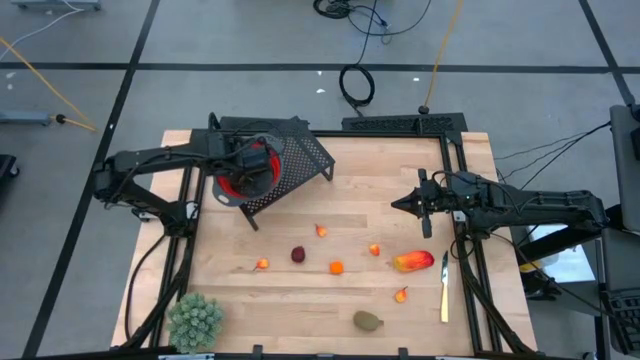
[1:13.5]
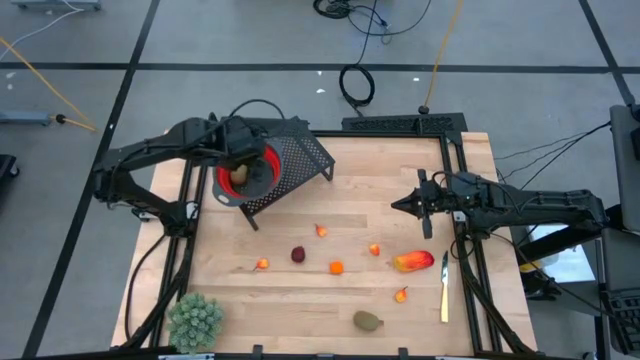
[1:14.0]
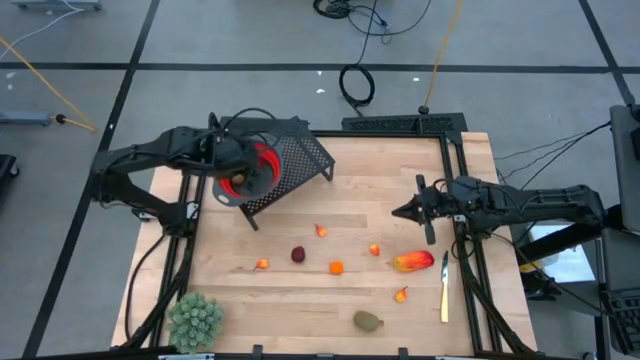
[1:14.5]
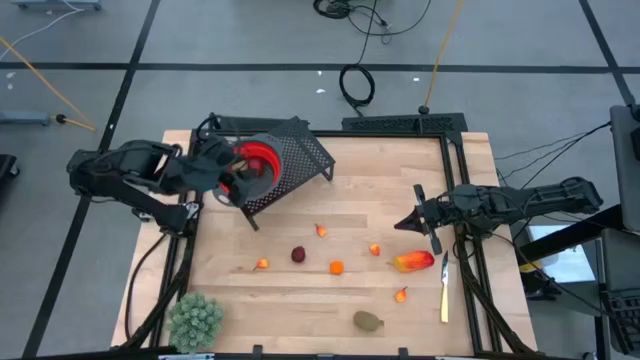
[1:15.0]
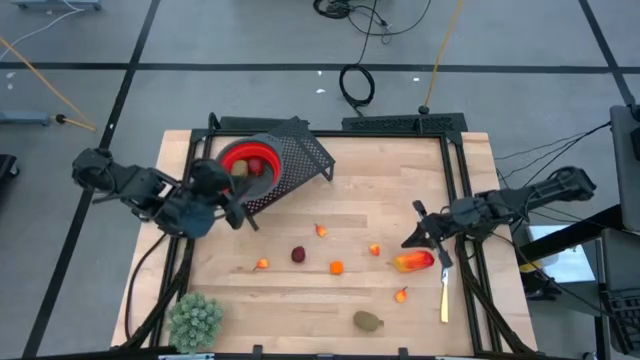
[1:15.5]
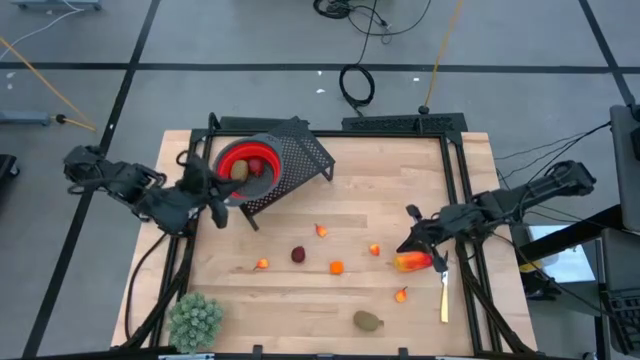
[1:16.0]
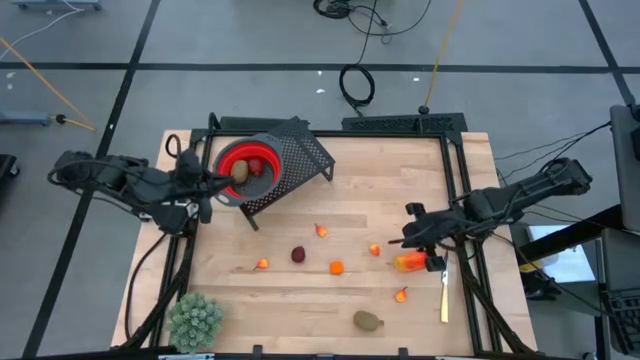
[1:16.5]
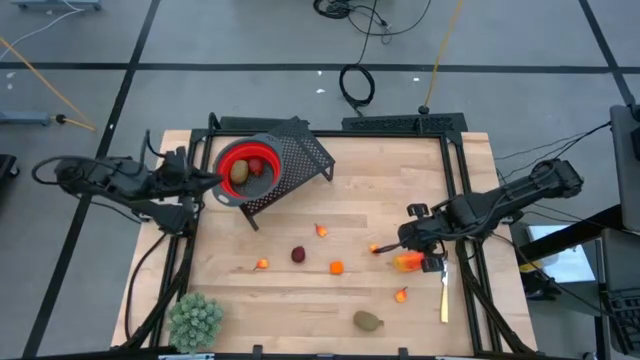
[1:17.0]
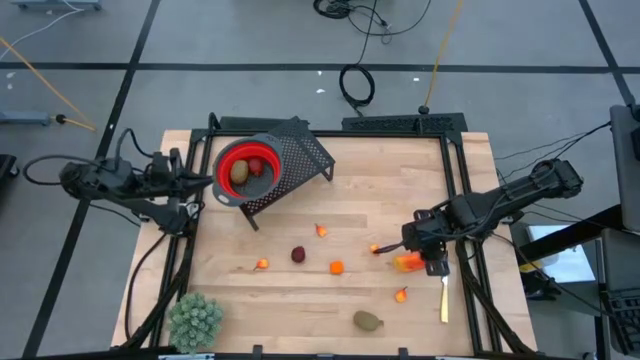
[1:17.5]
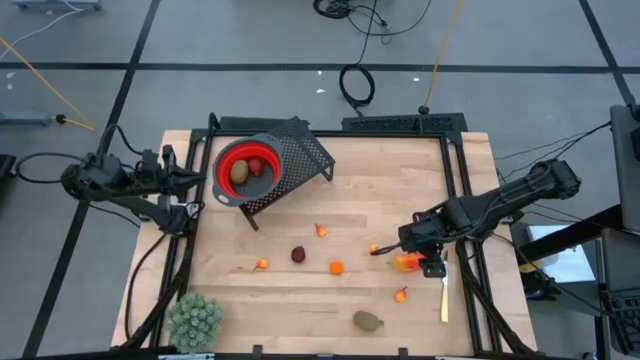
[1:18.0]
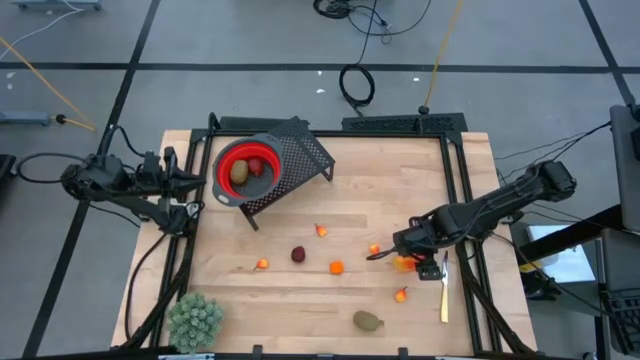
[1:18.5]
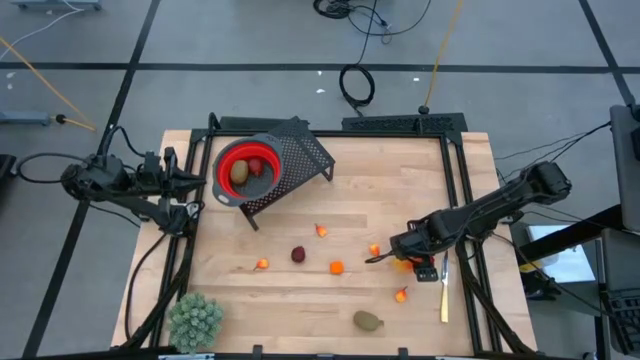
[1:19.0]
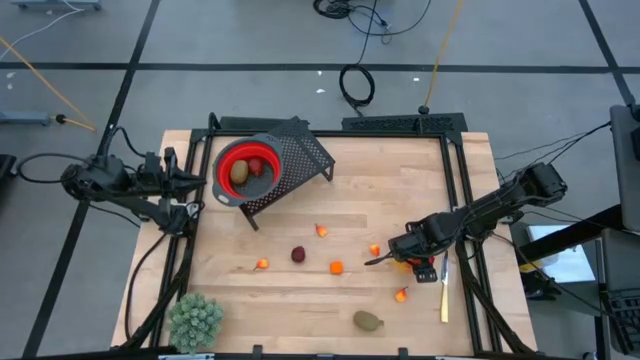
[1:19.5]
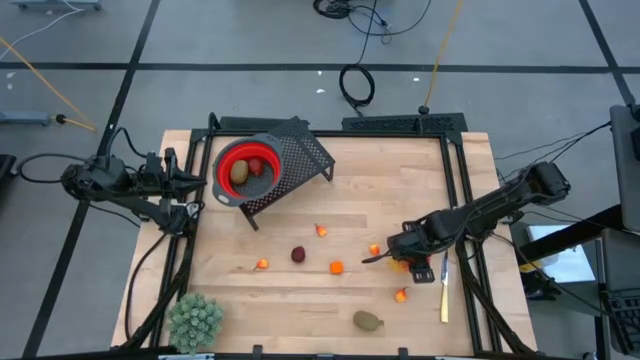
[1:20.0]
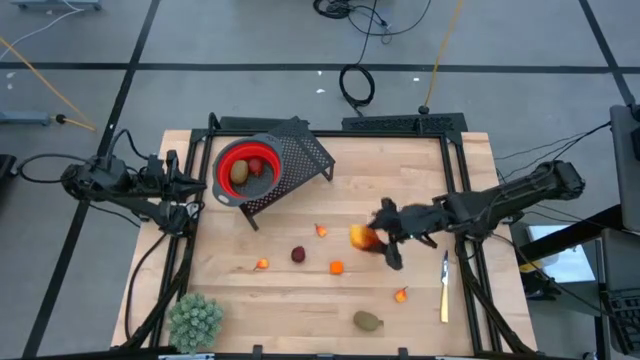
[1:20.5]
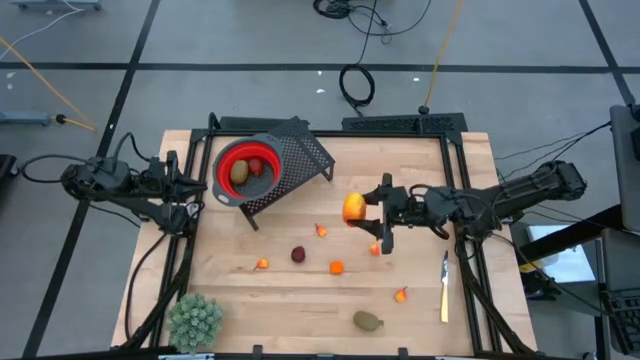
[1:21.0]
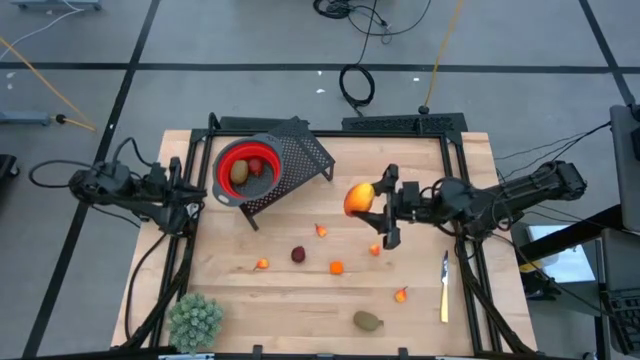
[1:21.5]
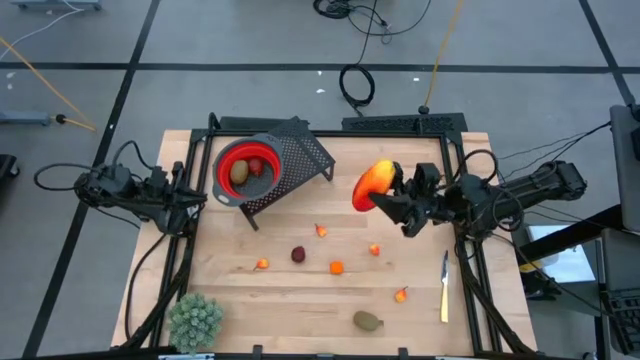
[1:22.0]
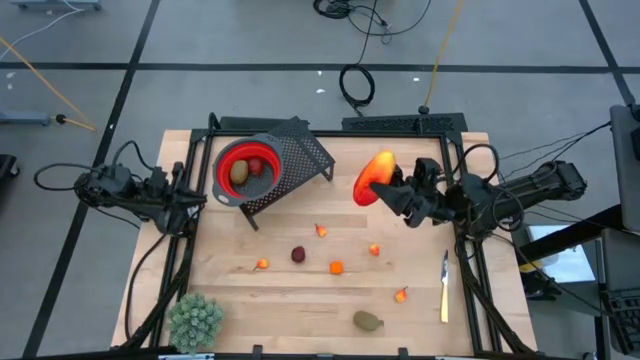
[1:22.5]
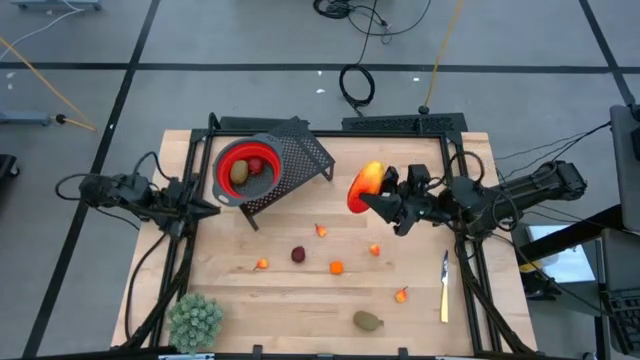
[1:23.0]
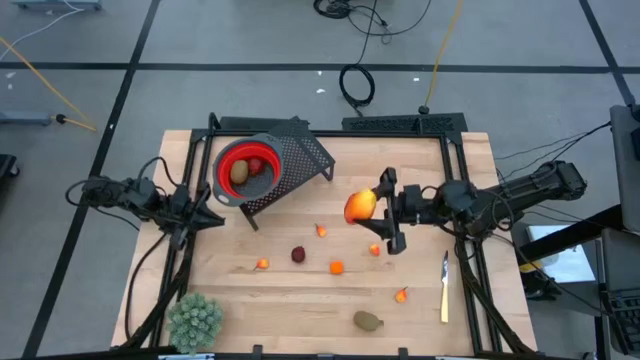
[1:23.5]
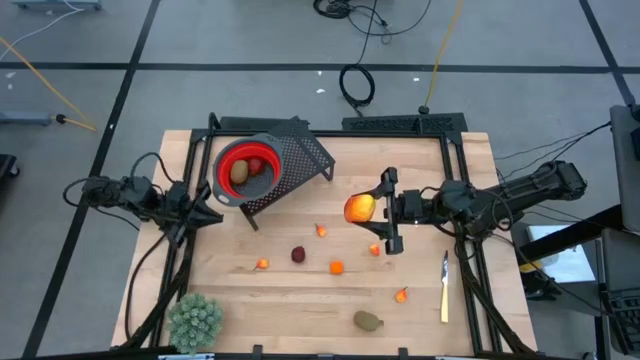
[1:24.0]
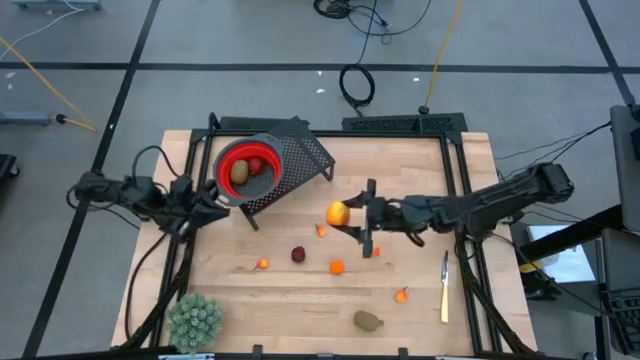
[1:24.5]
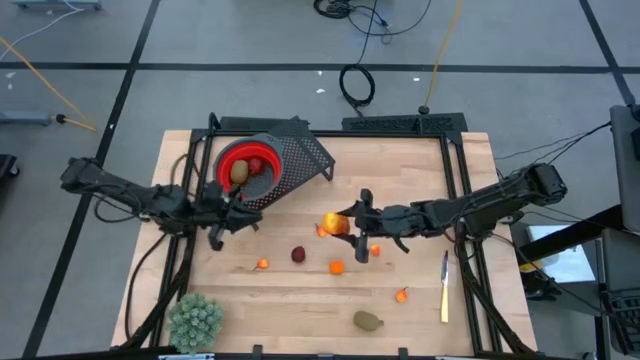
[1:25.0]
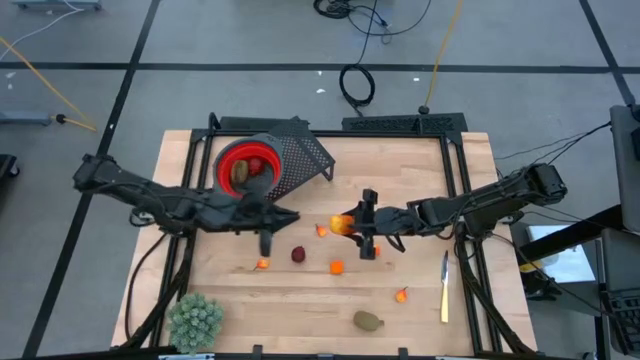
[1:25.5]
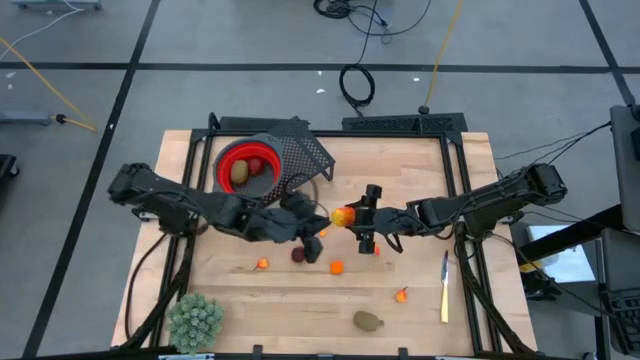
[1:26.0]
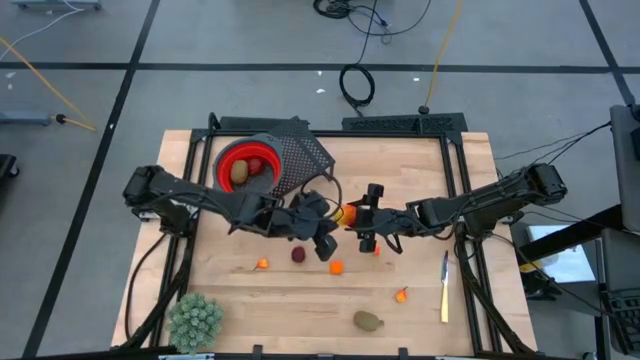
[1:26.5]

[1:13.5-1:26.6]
Task: Pick & Place Fruit
Put the mango into the red strainer bowl on the shelf

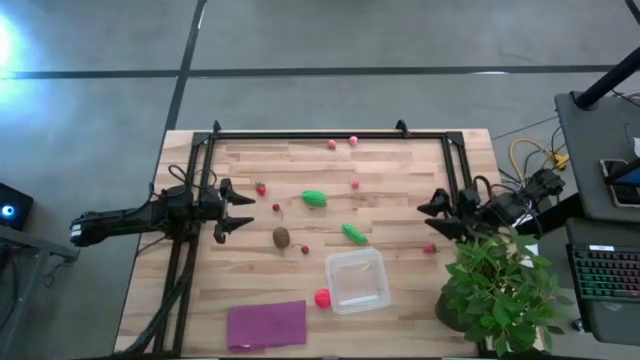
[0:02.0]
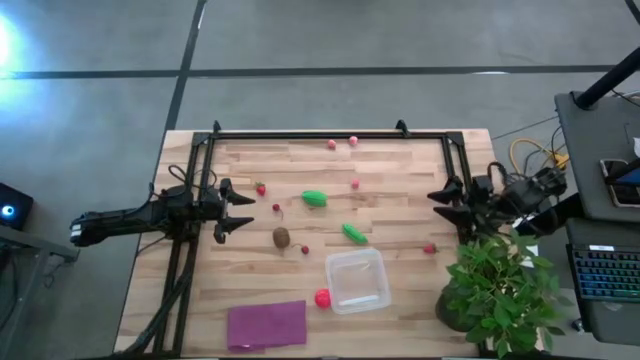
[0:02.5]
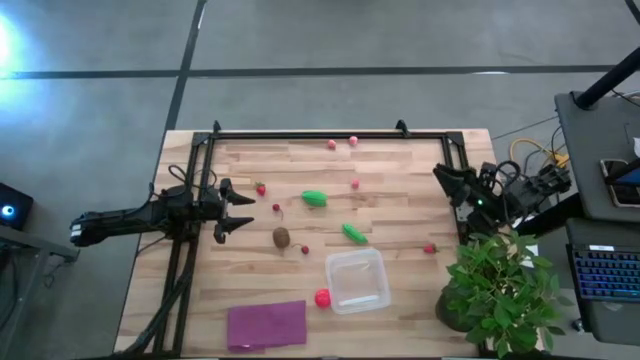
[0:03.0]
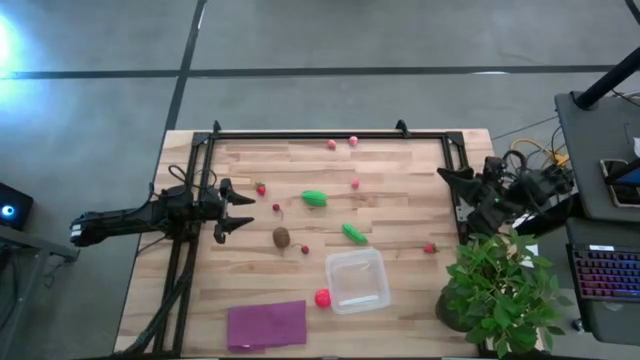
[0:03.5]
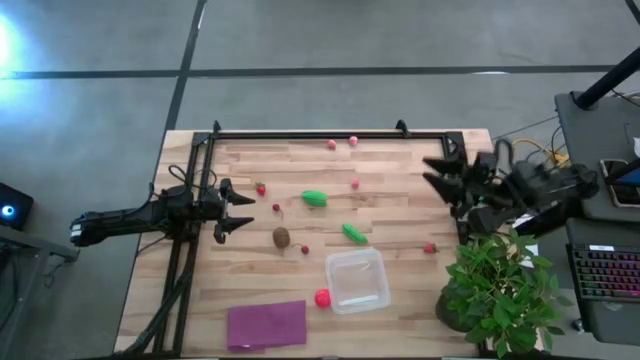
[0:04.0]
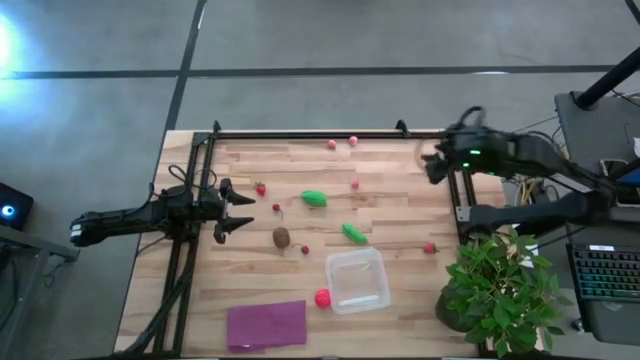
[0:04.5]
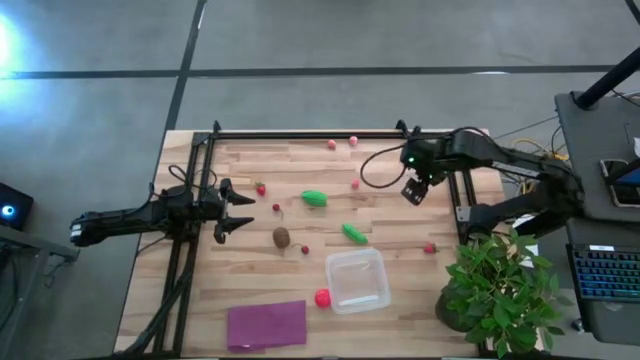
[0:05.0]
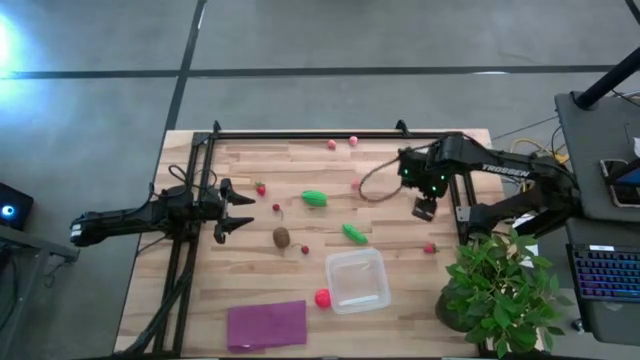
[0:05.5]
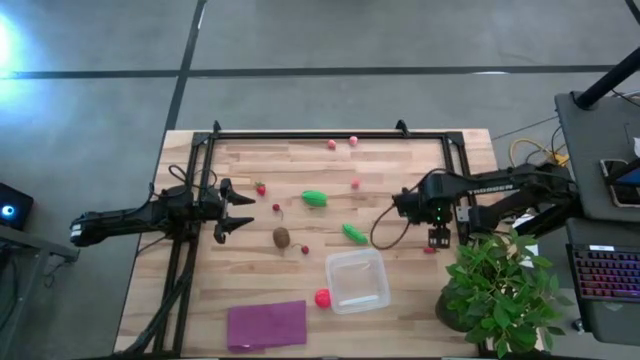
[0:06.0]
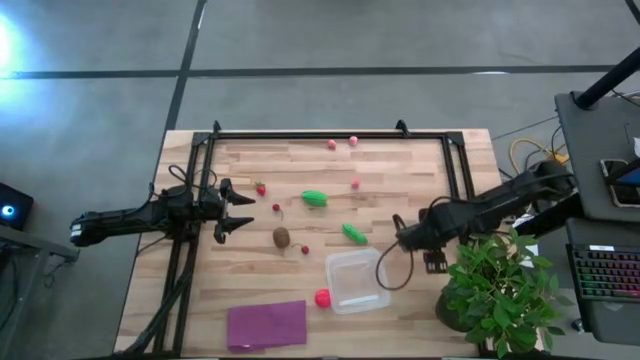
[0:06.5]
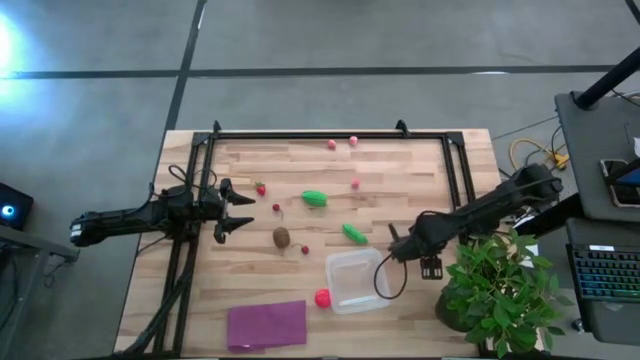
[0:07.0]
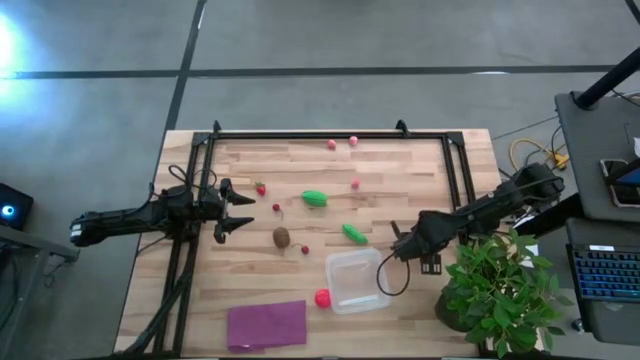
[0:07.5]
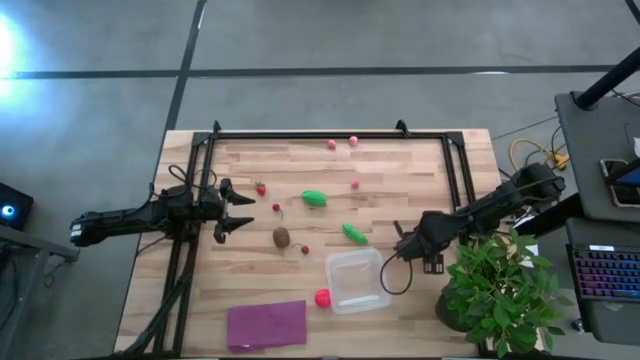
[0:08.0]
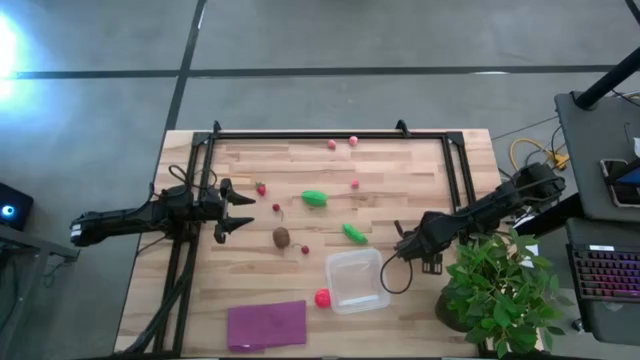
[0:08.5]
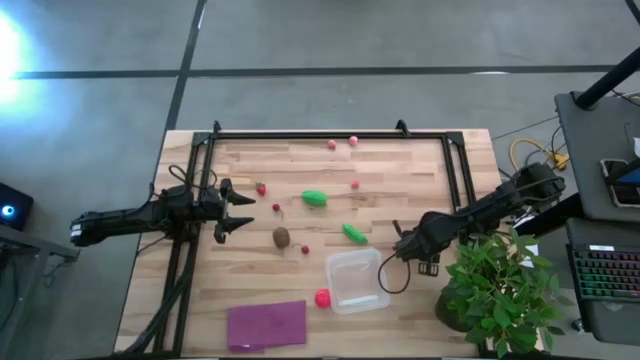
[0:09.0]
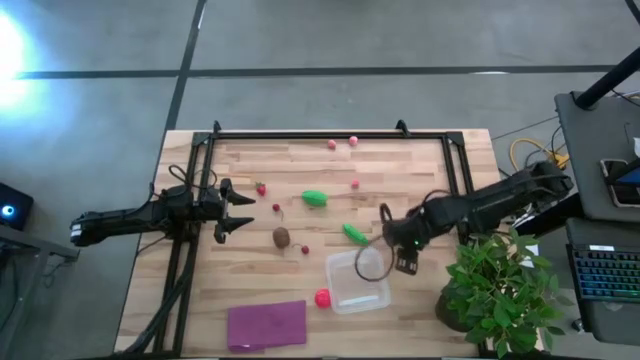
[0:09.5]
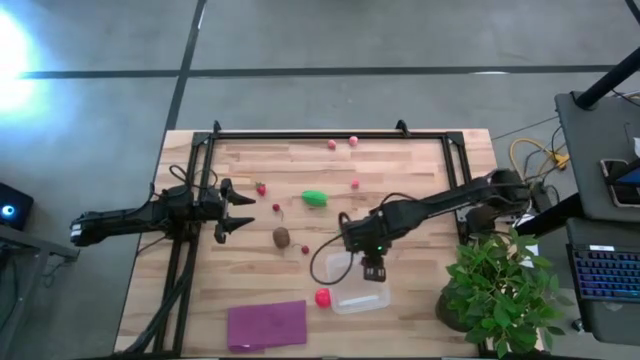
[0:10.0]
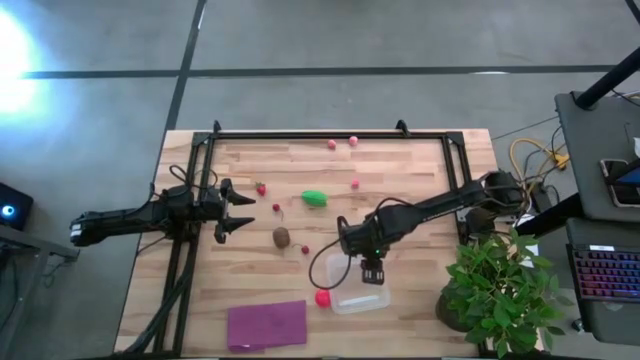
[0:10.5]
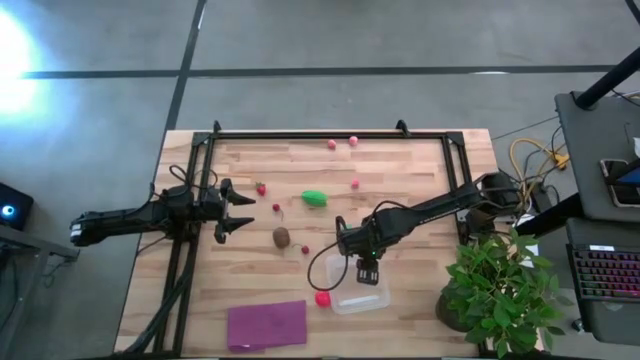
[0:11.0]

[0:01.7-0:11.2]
Task: Pick and placing Produce into tupperware
Put the bottom red strawberry into the transparent container
